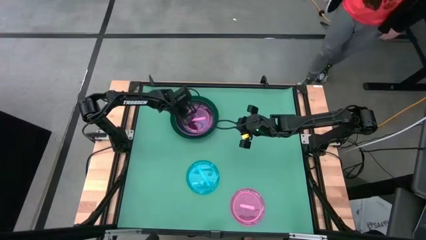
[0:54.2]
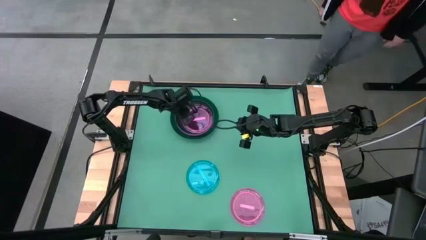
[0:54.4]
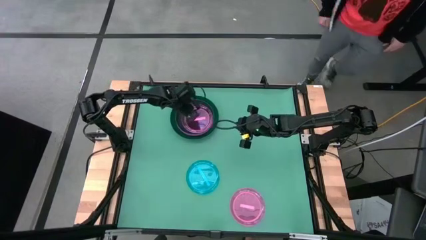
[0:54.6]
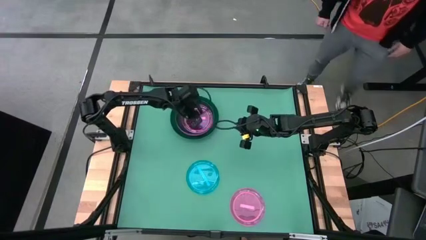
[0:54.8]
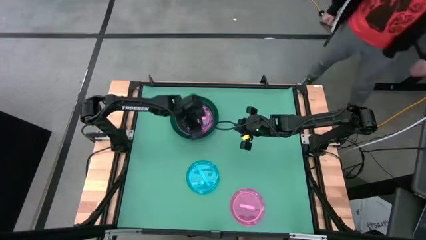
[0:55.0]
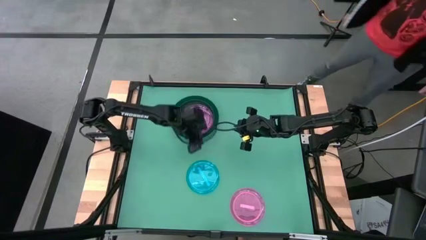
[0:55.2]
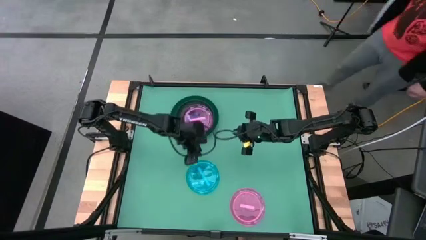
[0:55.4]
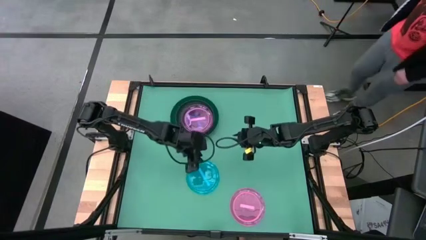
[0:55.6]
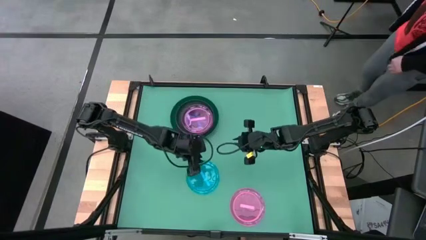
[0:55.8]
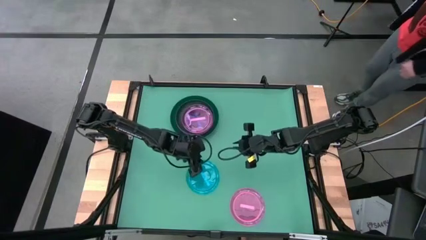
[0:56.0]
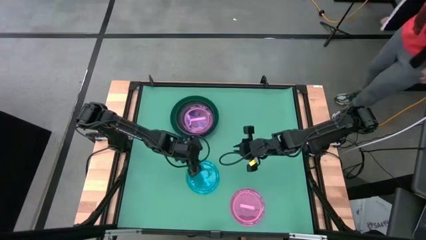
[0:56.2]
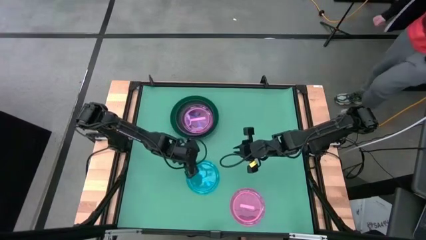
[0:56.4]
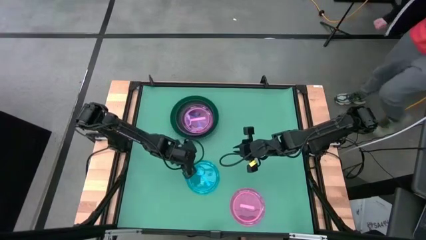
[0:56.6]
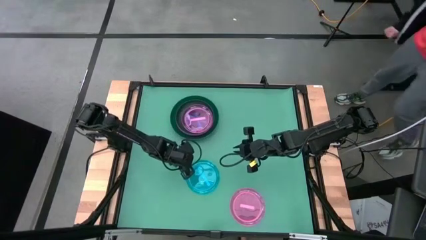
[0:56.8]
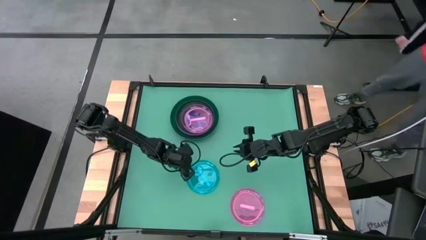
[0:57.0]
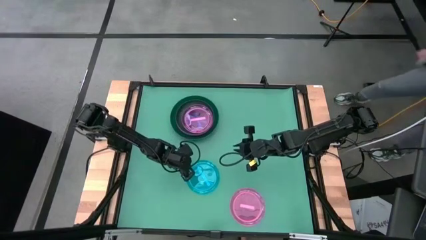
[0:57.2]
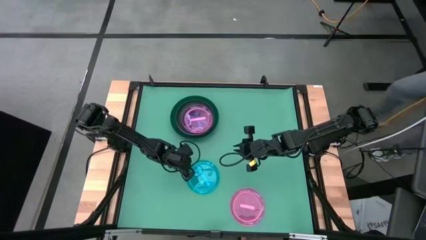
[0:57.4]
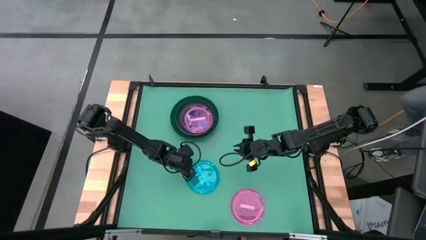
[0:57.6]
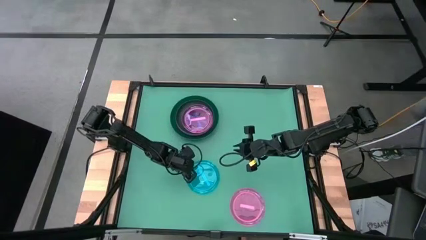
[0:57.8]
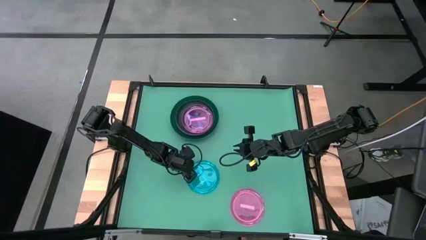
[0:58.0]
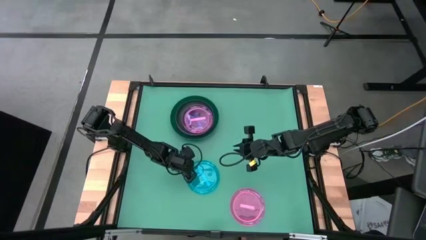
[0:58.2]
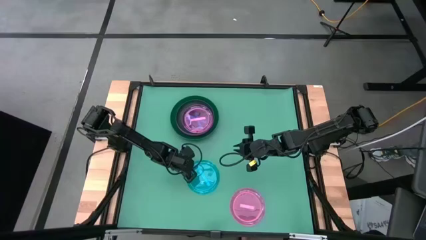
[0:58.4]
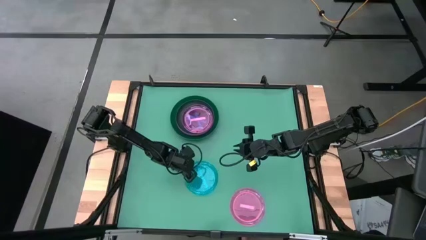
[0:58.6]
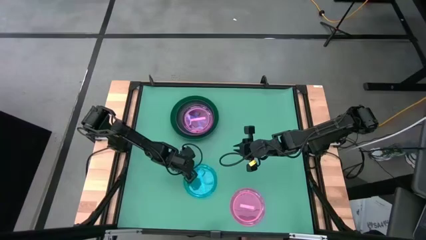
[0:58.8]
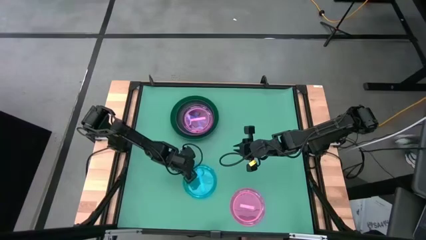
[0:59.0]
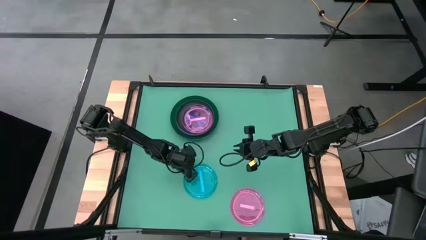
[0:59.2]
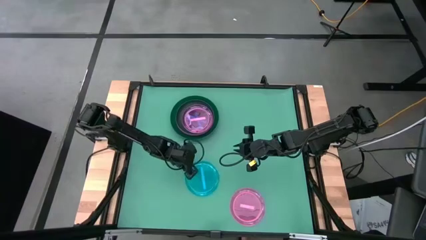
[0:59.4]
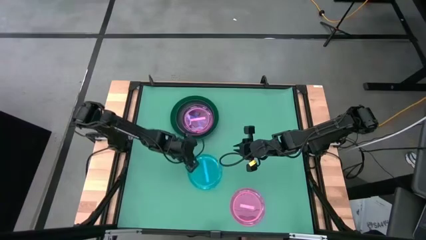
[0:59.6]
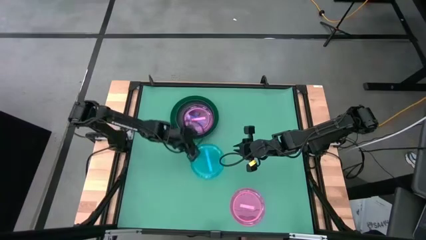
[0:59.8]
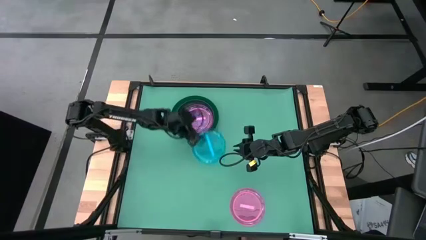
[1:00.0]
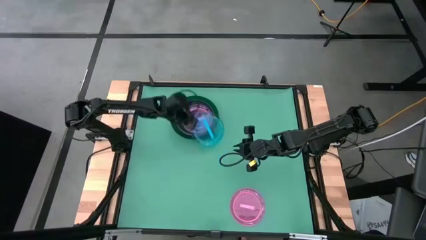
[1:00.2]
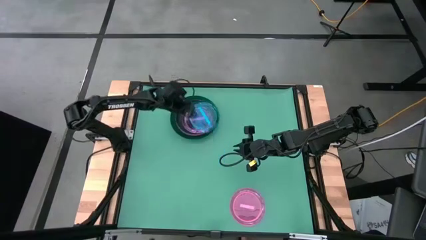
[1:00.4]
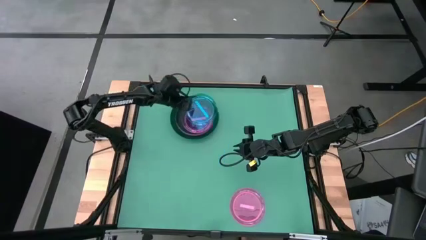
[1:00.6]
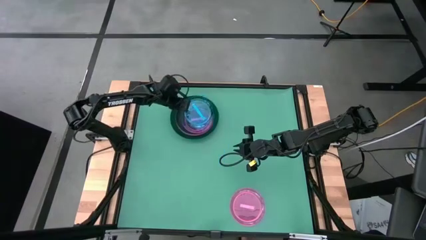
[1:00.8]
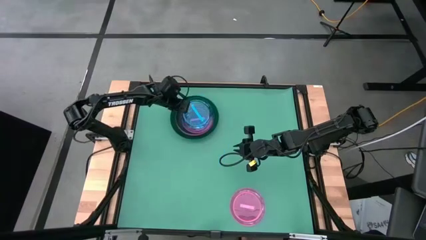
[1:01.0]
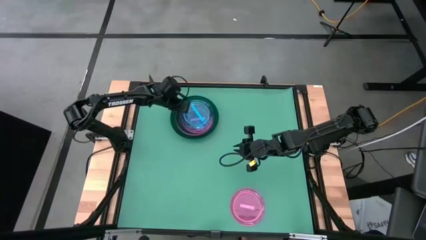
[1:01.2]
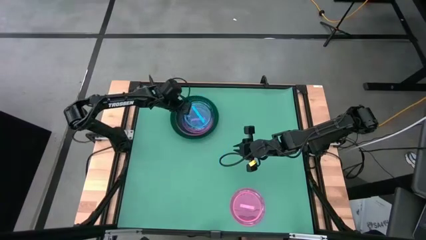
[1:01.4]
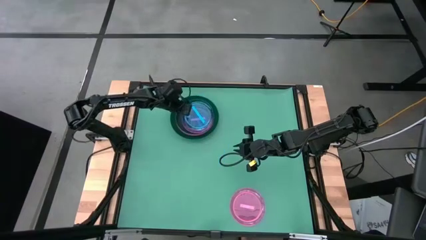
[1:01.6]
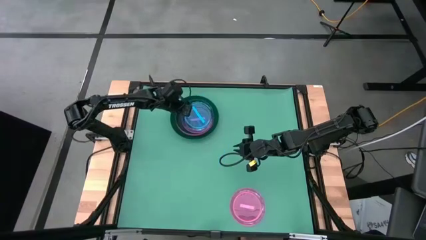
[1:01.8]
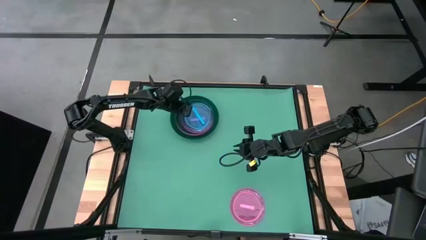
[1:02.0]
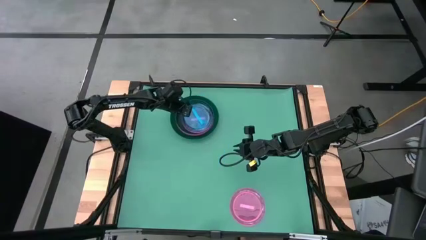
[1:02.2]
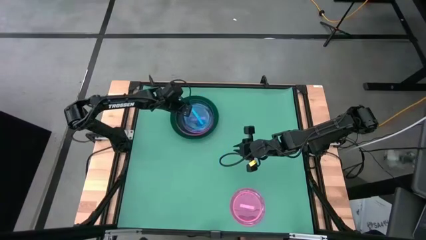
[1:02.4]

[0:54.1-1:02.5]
Task: Stack plastic plates
Stack the blue plate on top of the light pink plate

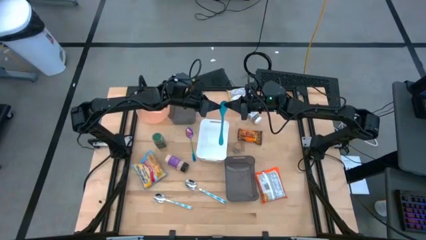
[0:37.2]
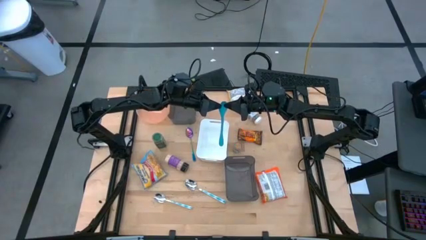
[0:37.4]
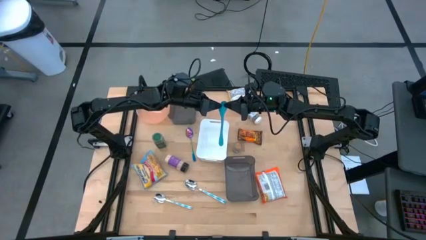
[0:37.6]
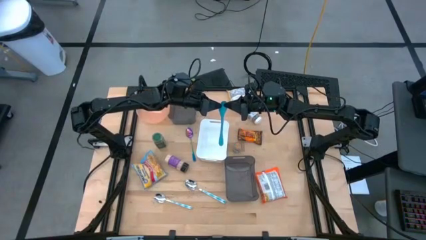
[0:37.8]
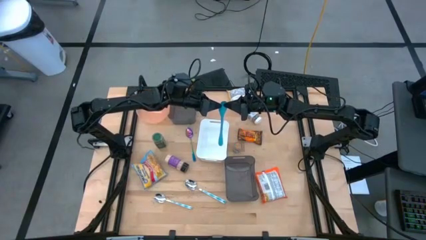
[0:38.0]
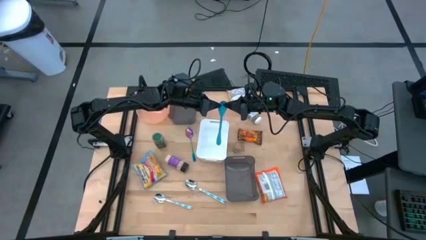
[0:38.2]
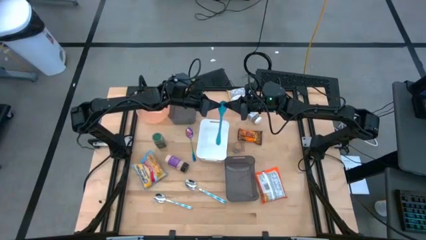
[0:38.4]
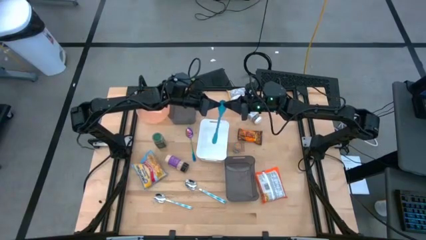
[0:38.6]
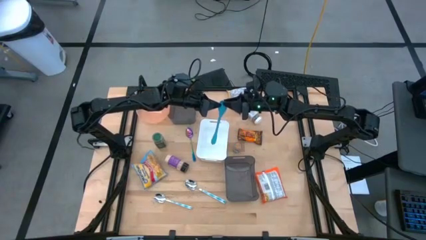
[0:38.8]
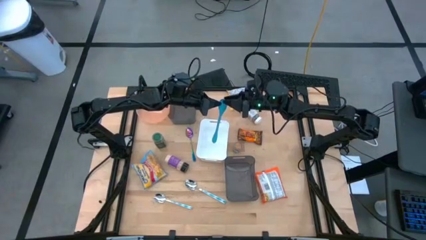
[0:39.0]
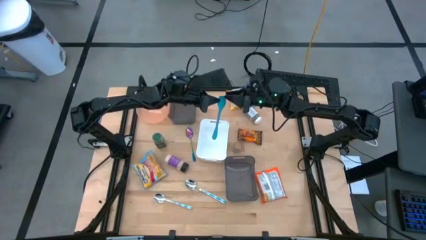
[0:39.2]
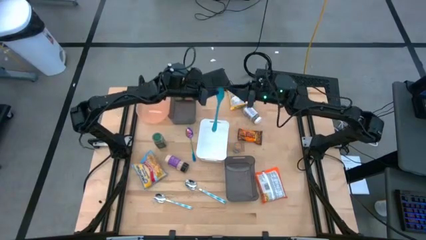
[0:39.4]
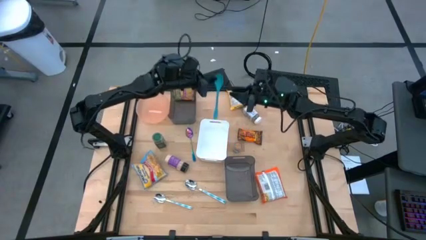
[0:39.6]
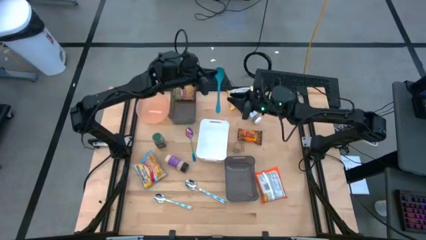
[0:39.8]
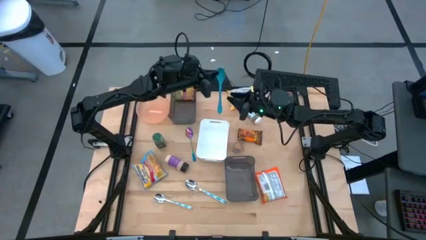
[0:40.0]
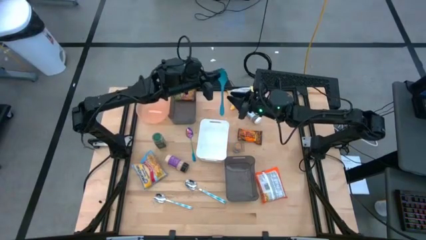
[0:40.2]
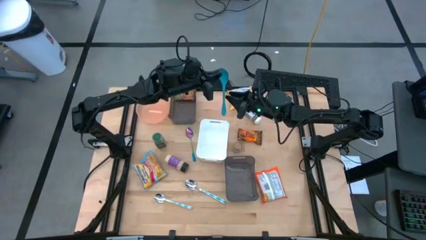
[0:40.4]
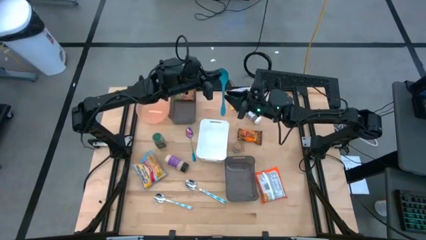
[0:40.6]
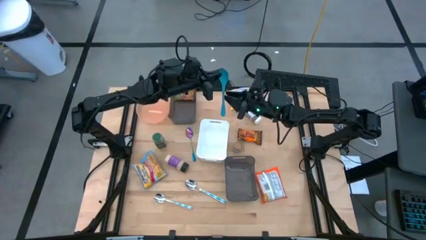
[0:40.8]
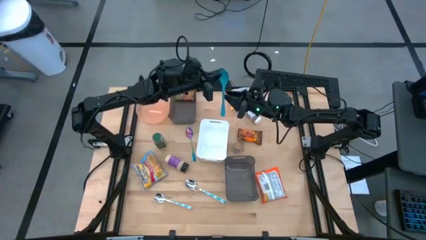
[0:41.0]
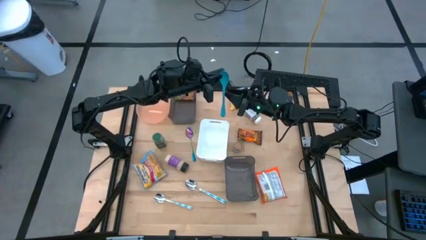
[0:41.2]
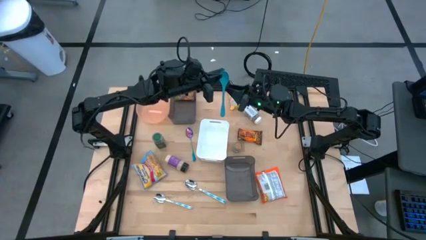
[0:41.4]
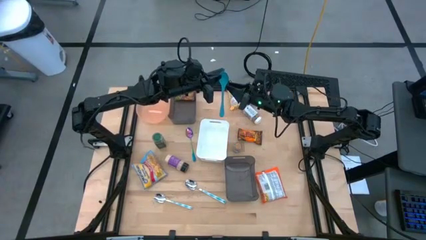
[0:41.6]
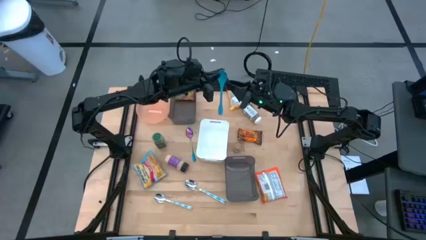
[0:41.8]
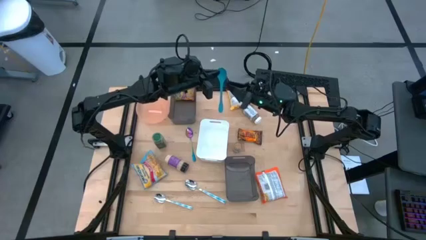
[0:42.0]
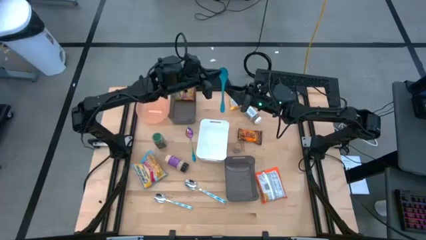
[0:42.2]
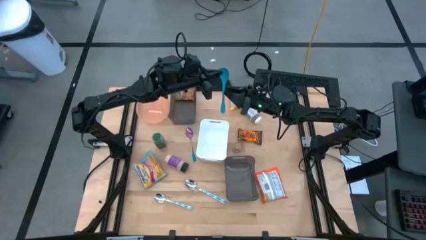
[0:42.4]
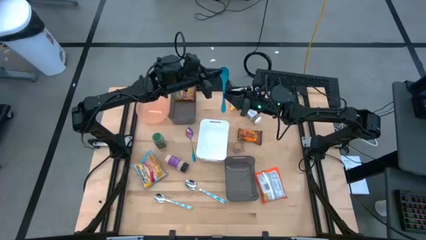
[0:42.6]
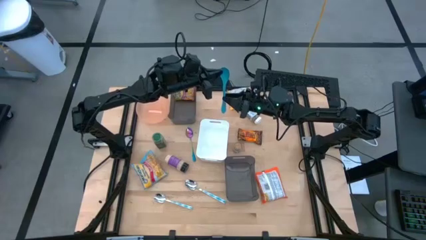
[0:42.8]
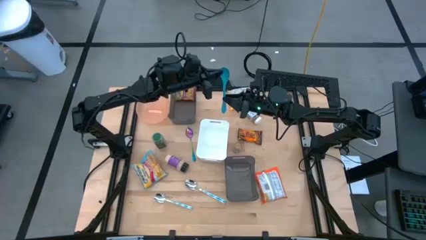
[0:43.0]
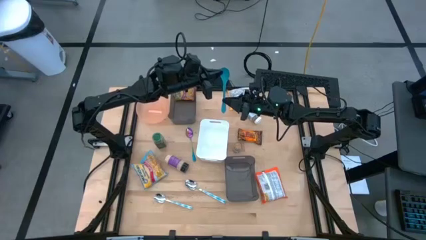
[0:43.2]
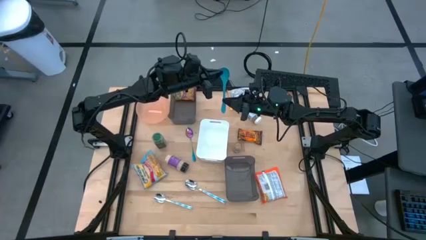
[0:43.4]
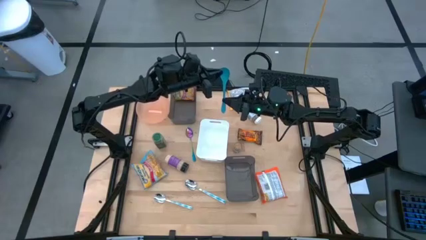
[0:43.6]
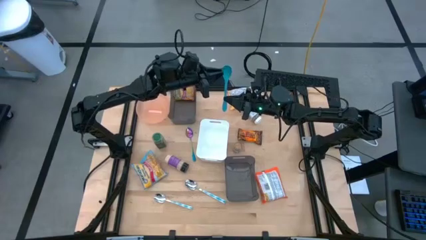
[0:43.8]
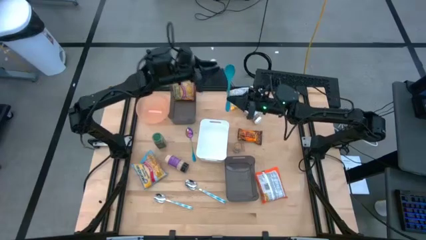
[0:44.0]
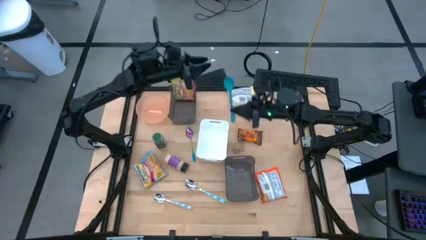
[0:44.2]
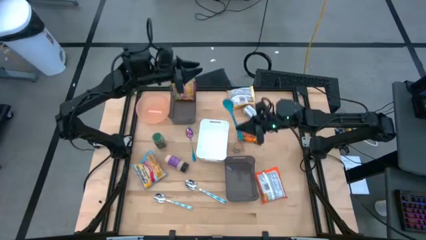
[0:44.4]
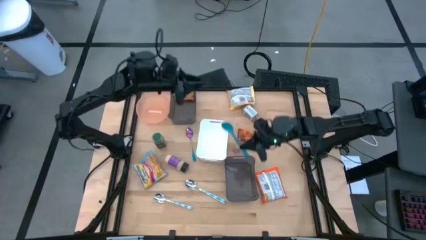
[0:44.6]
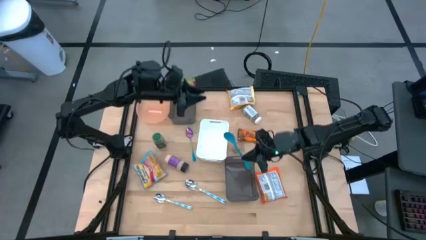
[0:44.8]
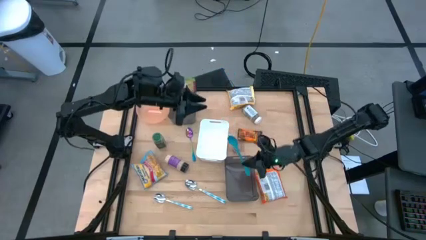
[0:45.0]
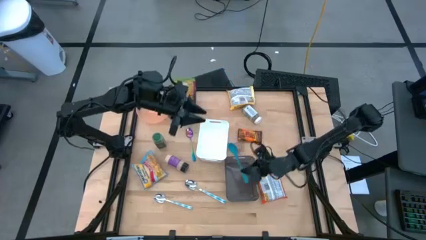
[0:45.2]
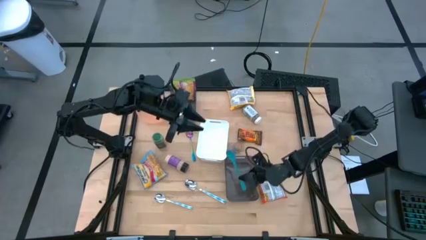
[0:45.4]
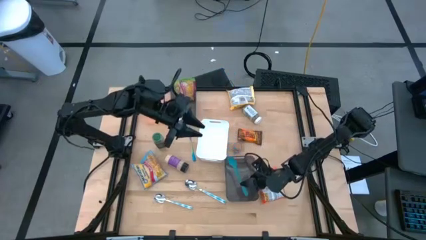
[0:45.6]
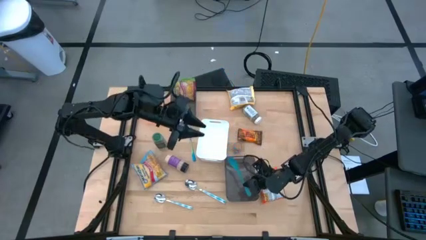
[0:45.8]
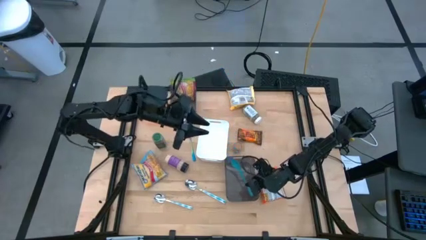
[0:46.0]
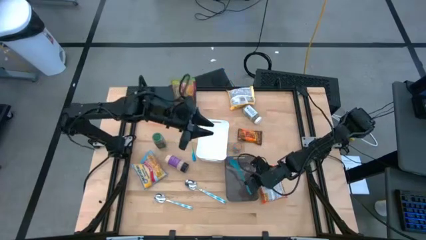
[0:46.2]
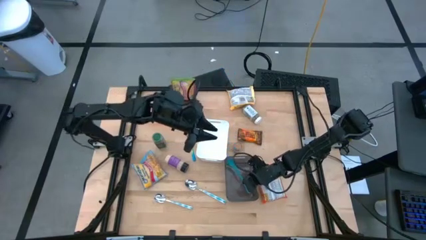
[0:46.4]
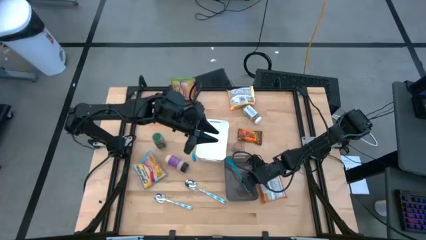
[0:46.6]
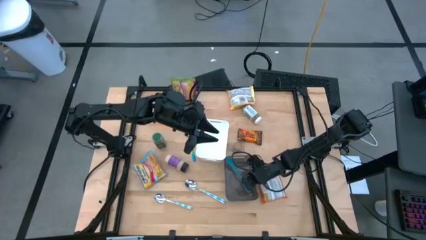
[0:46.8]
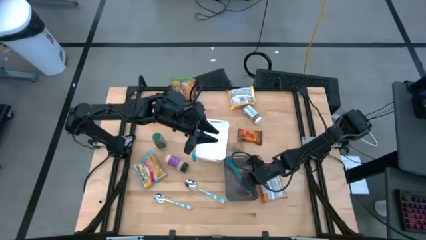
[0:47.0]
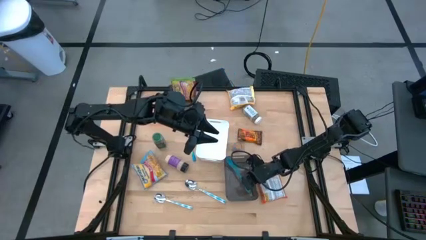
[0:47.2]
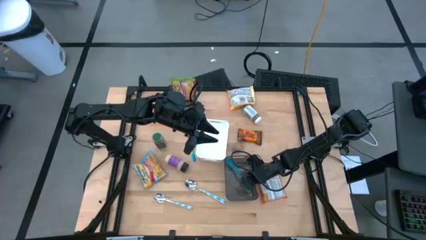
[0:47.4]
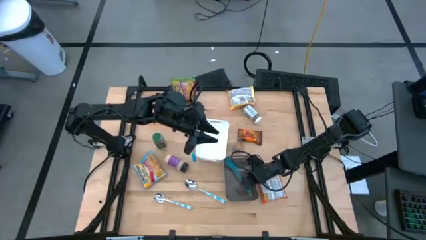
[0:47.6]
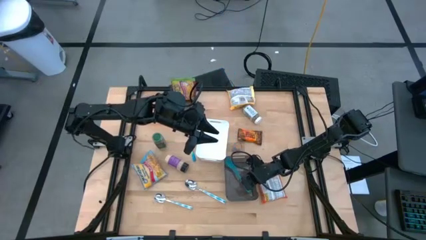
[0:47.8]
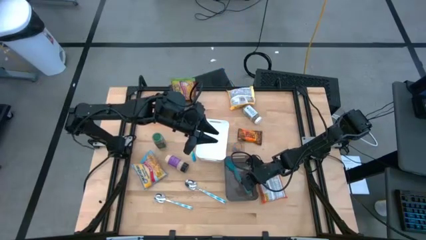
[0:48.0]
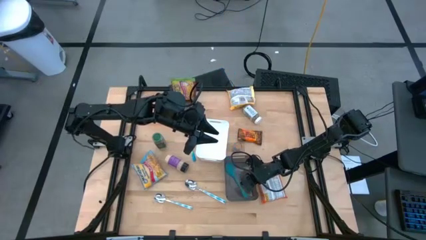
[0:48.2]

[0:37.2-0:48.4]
Task: Pick & Place Food Item
Put the blue baby spoon into the bottom black bin
